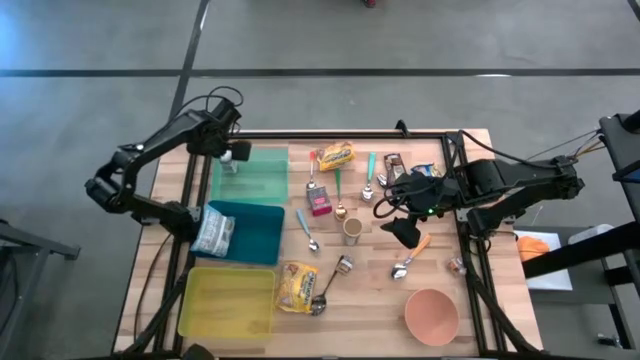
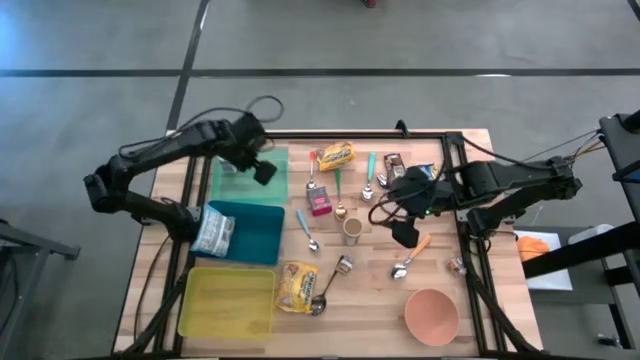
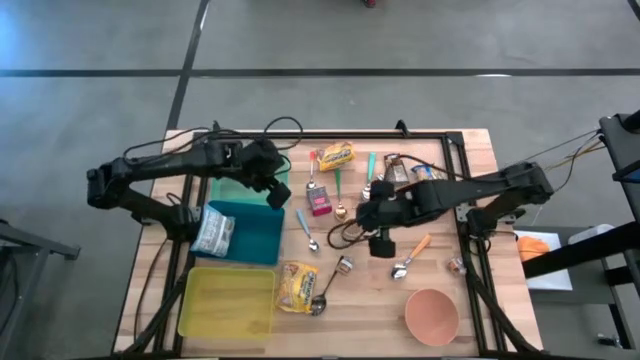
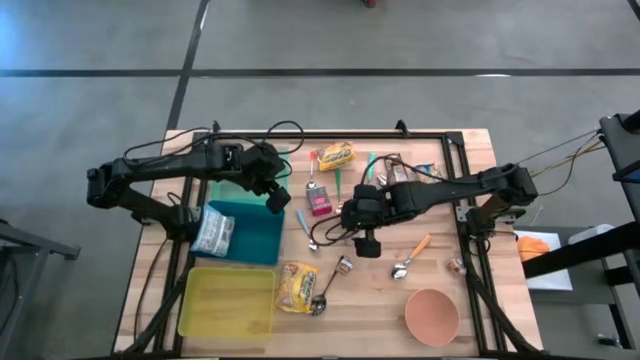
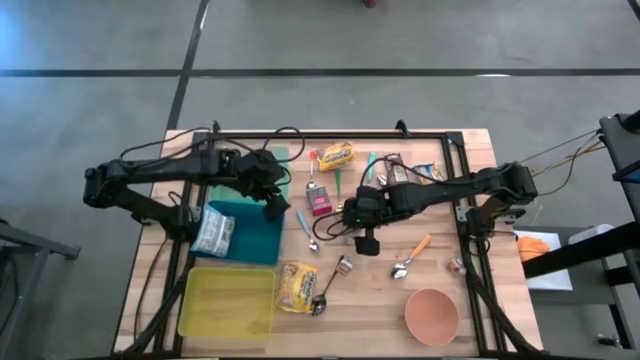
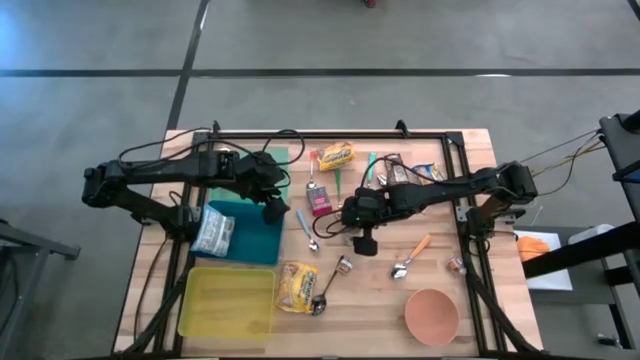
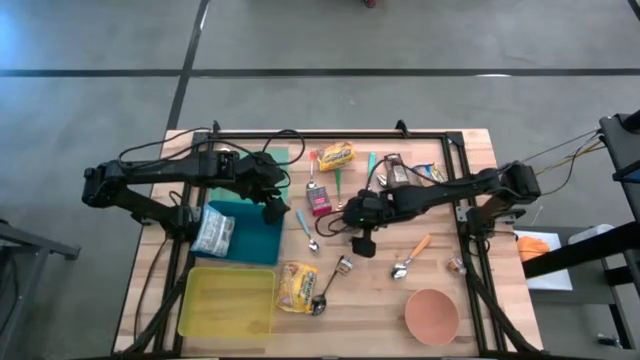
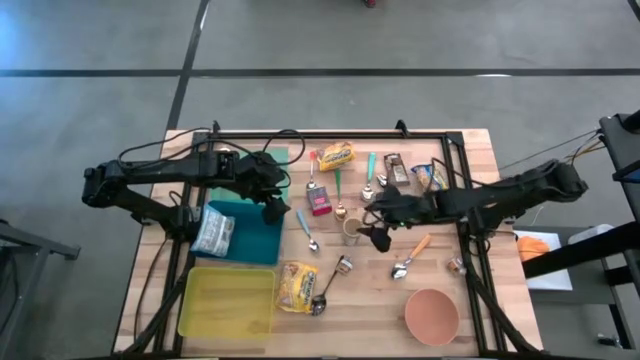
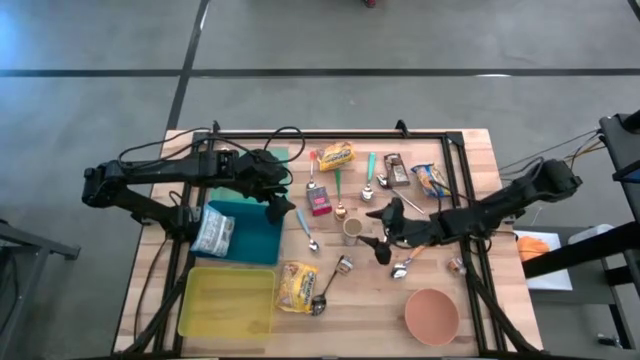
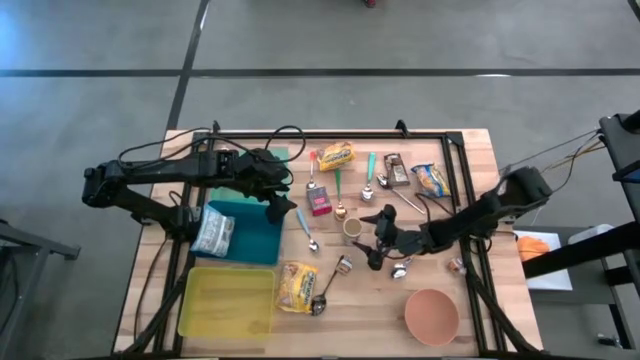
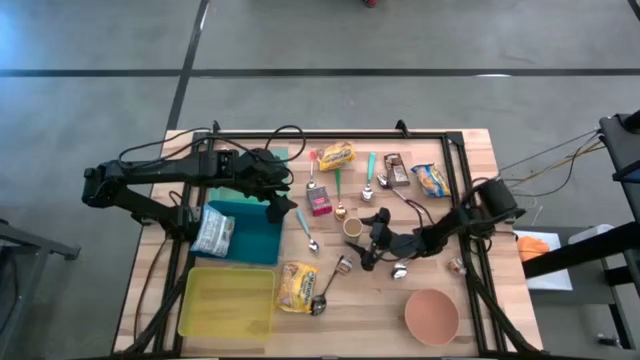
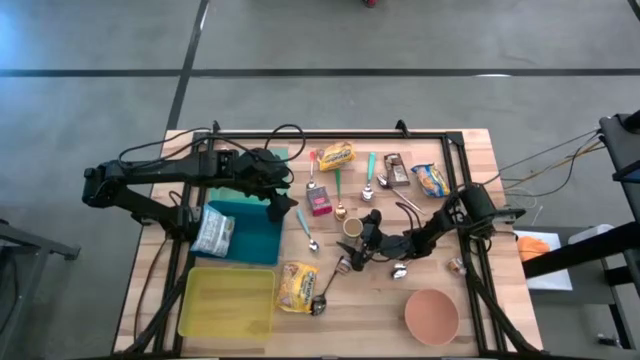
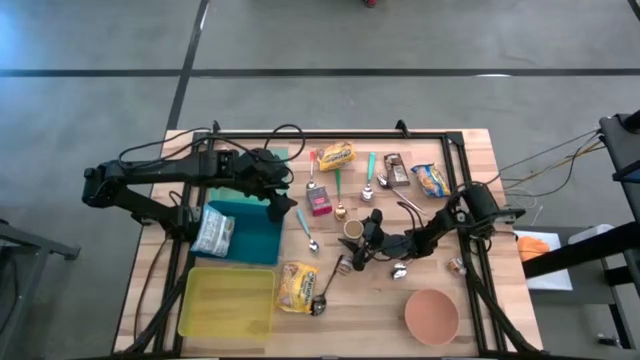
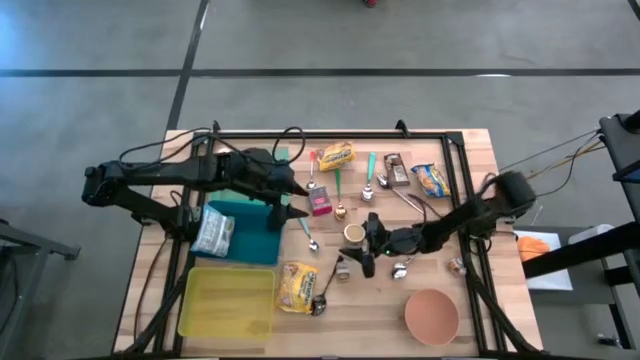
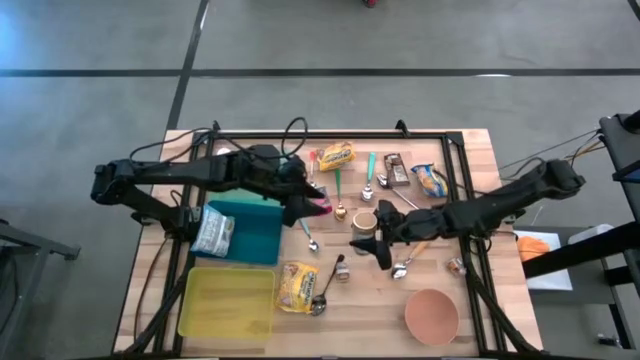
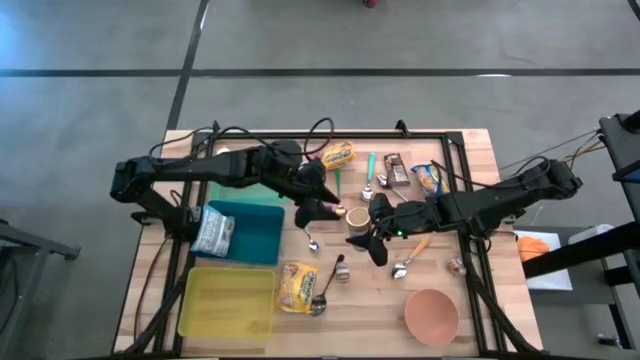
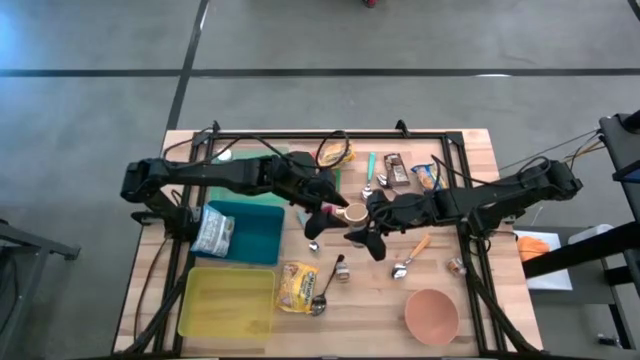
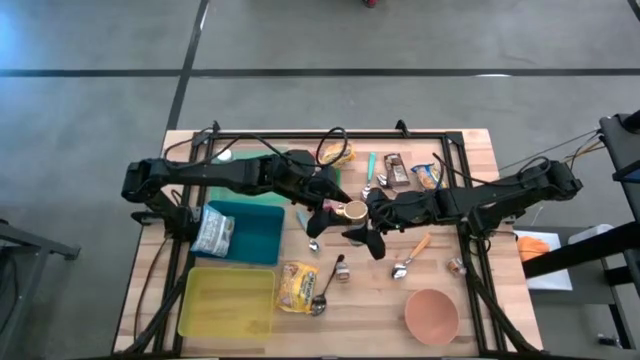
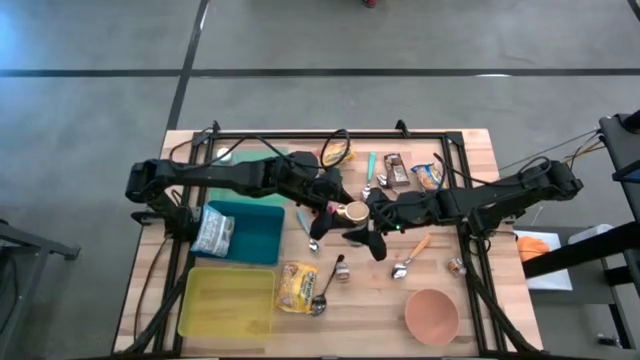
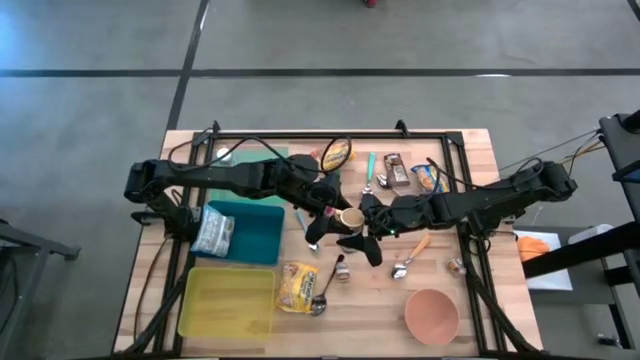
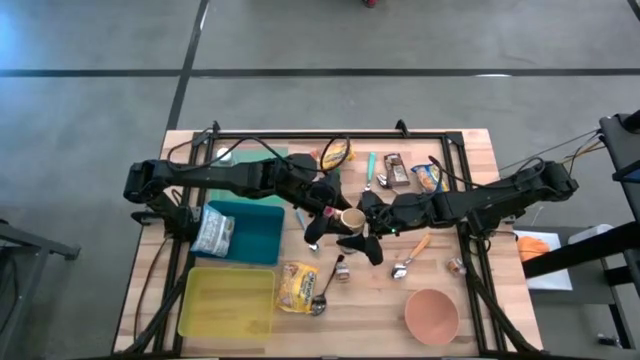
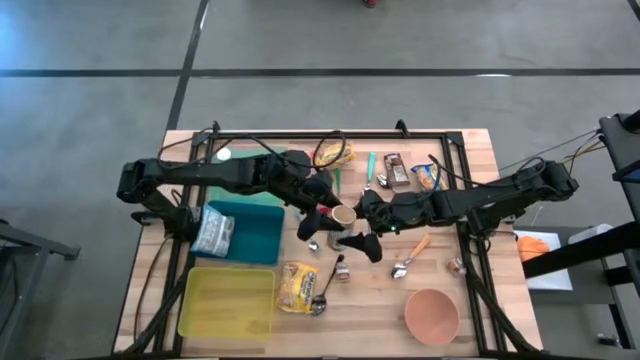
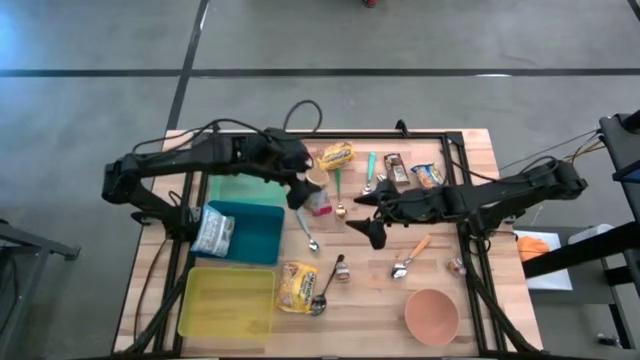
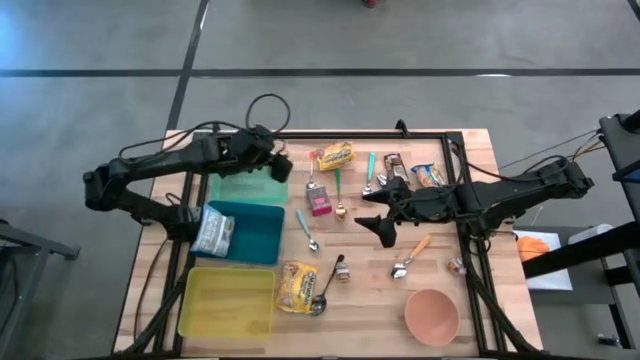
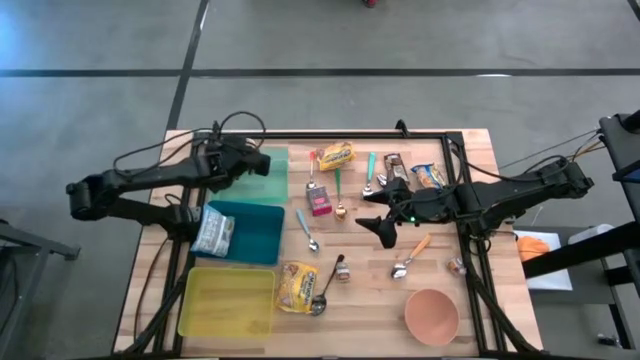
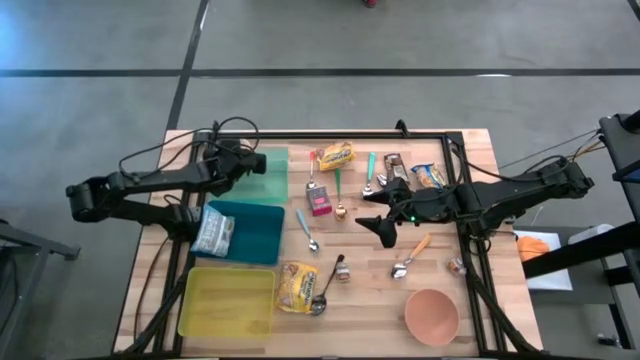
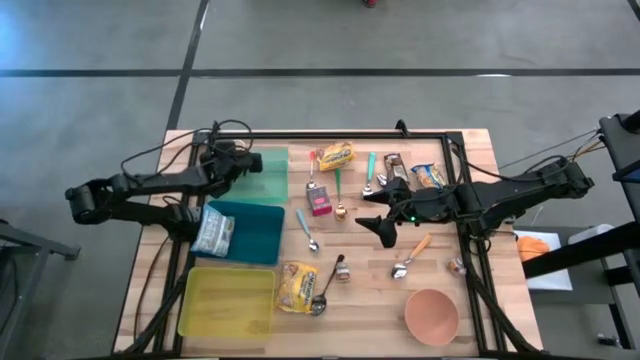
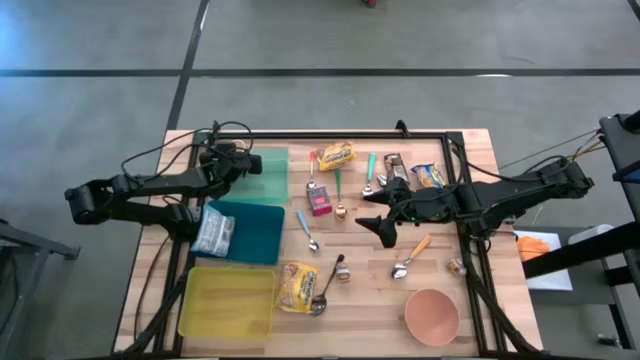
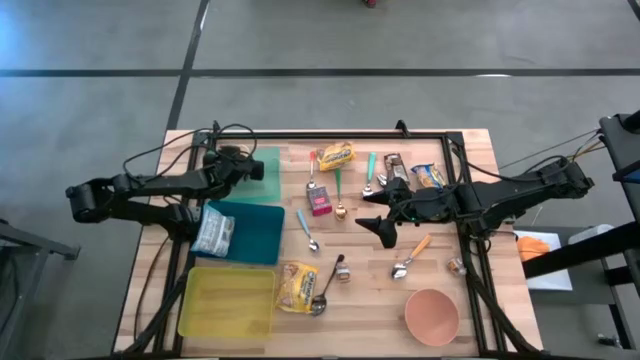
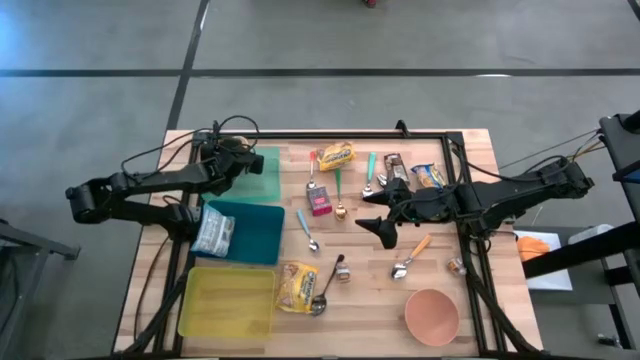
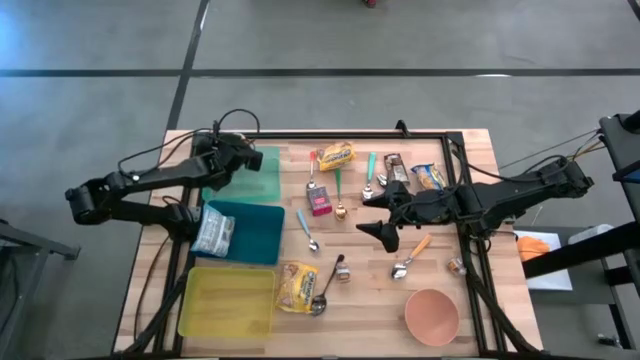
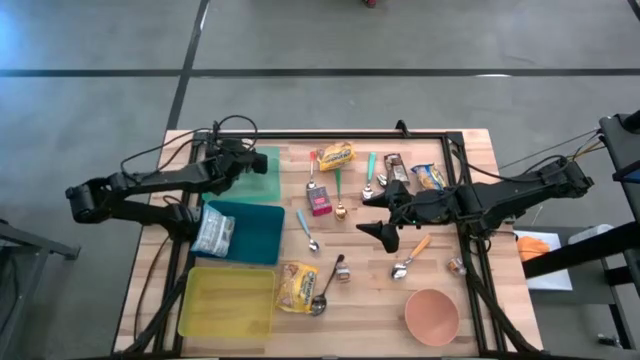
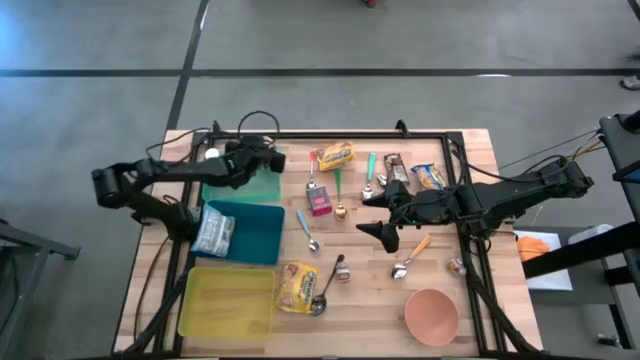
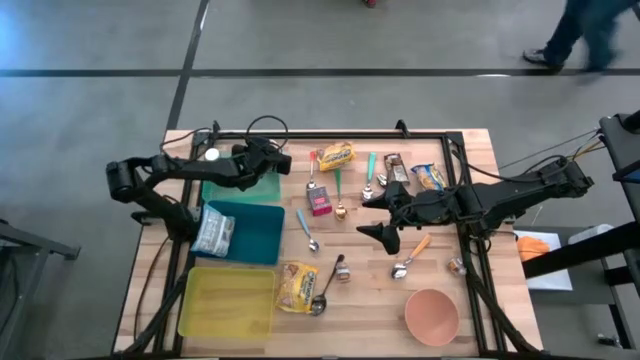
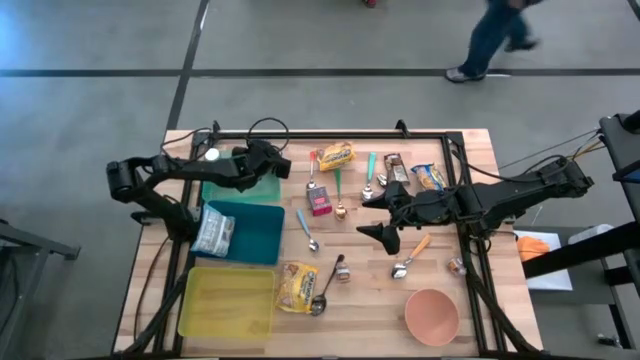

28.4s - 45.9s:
Put the gold seasoning bottle into the light blue bin
